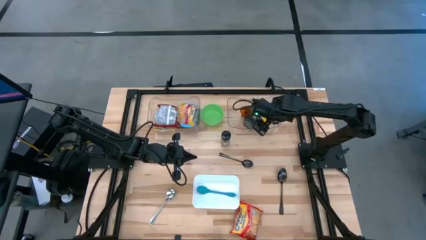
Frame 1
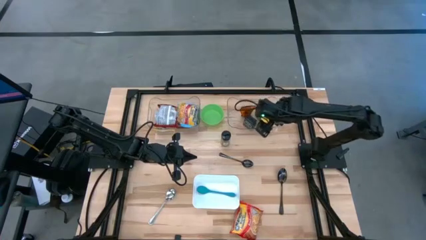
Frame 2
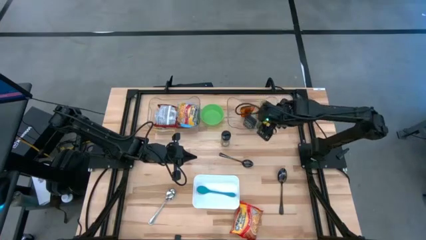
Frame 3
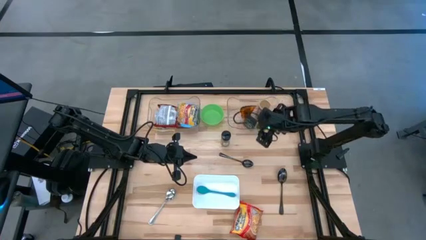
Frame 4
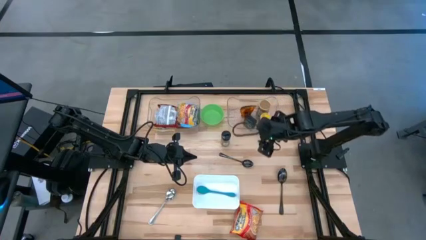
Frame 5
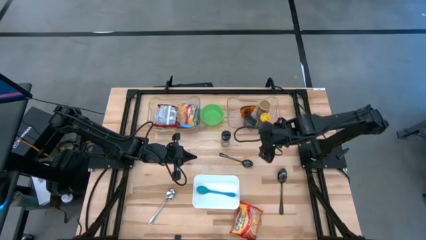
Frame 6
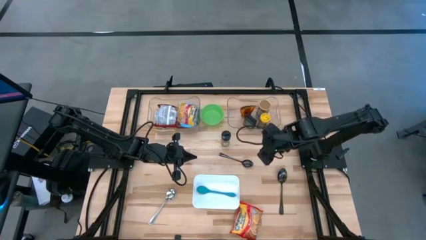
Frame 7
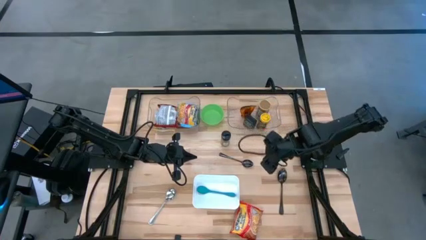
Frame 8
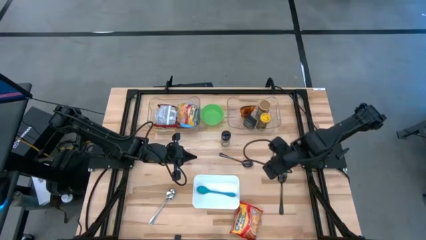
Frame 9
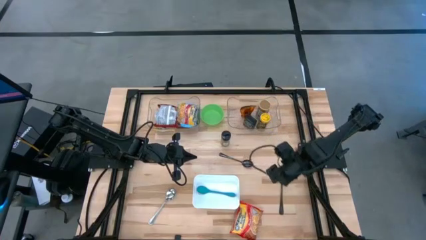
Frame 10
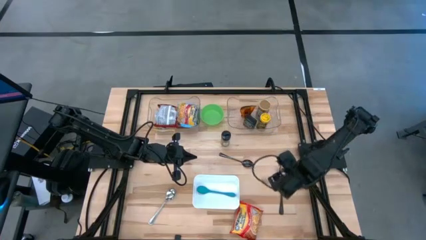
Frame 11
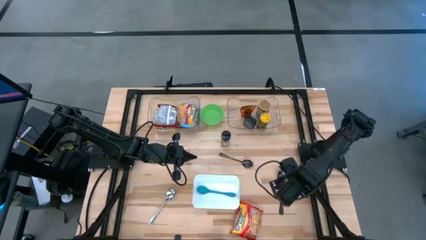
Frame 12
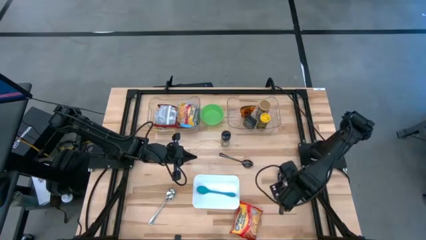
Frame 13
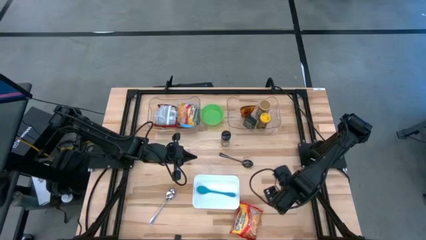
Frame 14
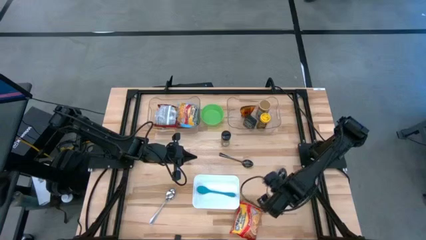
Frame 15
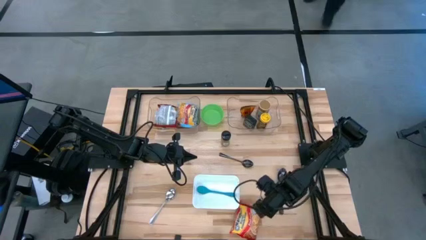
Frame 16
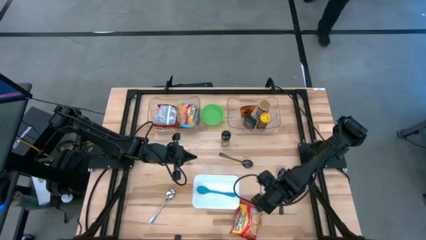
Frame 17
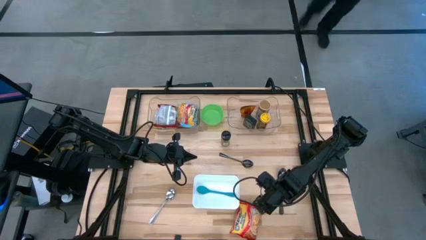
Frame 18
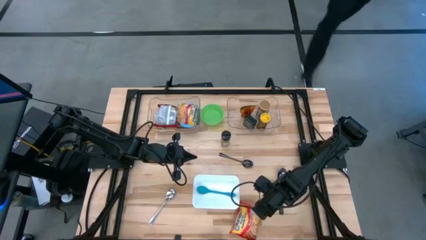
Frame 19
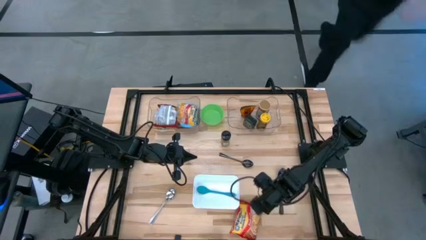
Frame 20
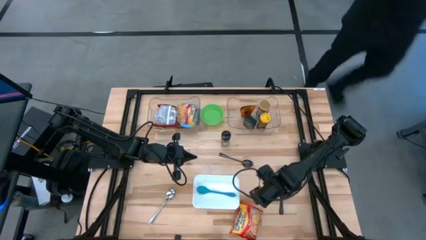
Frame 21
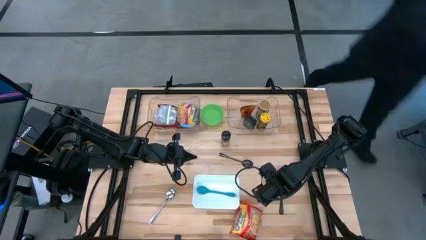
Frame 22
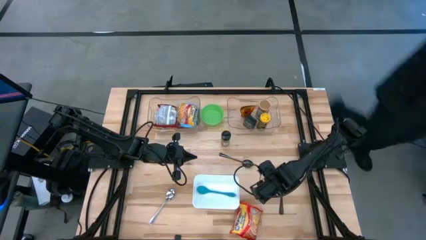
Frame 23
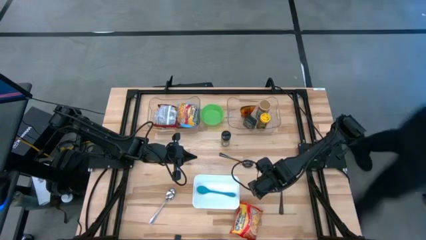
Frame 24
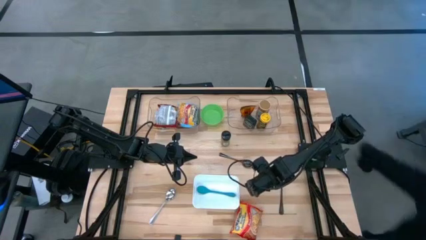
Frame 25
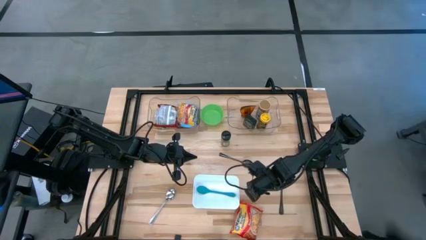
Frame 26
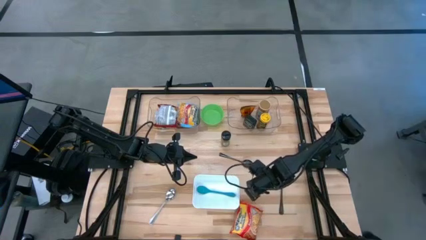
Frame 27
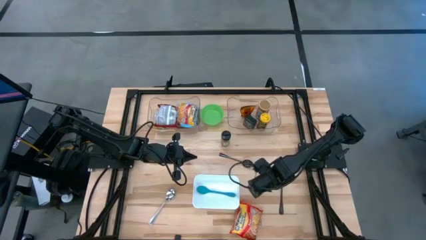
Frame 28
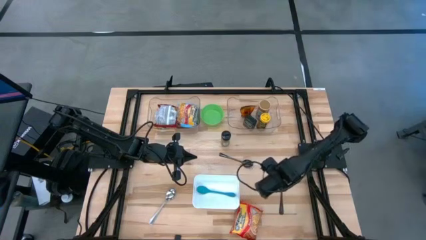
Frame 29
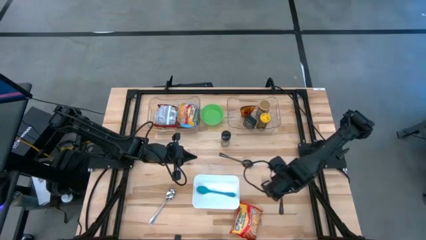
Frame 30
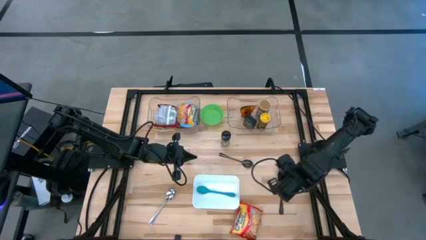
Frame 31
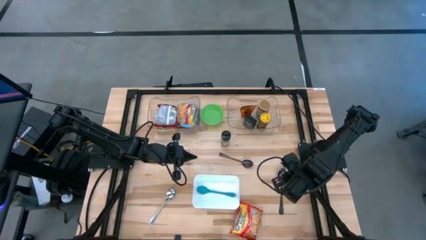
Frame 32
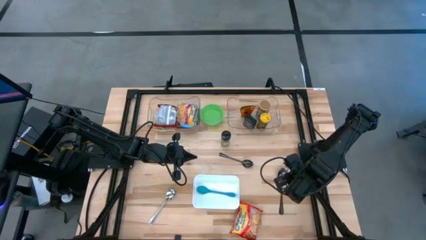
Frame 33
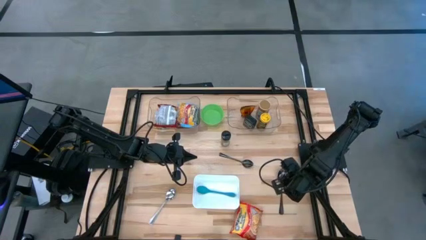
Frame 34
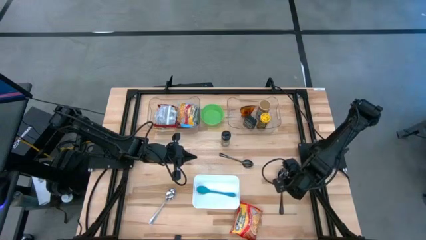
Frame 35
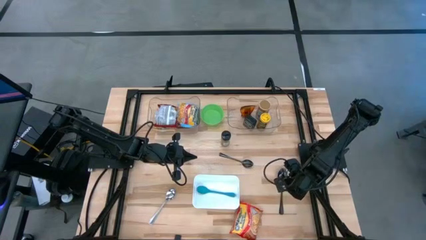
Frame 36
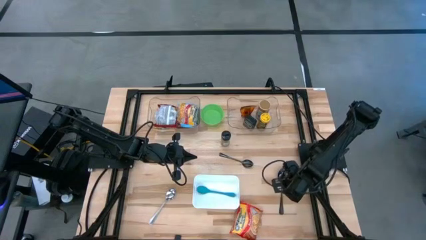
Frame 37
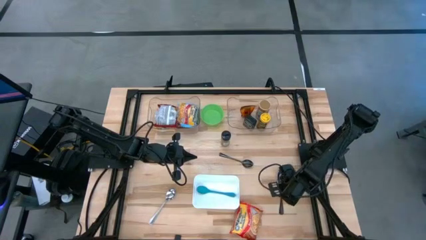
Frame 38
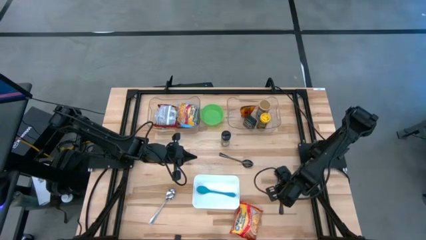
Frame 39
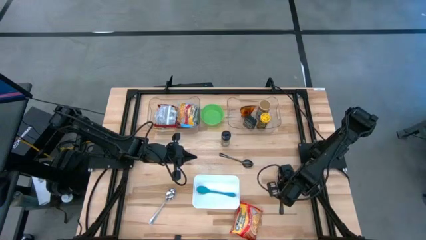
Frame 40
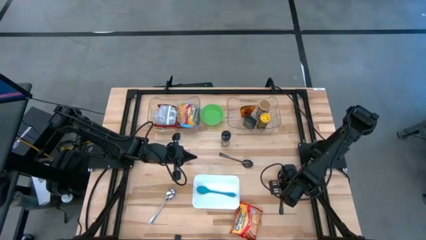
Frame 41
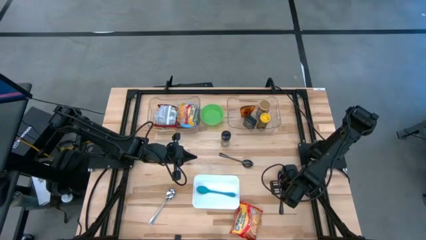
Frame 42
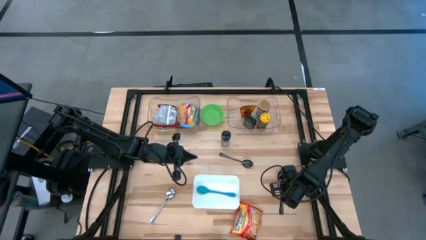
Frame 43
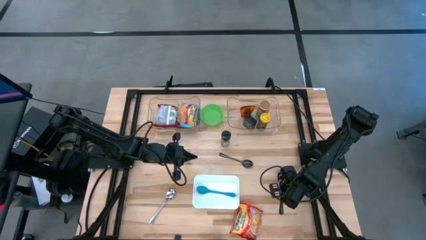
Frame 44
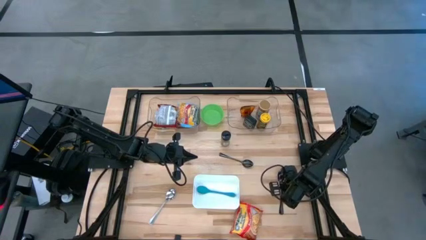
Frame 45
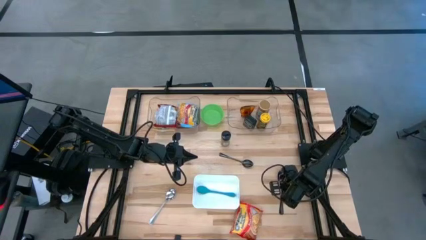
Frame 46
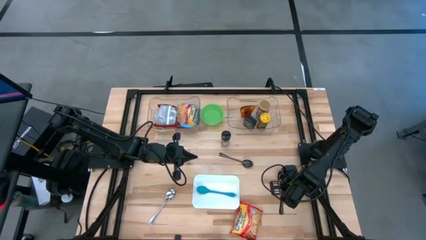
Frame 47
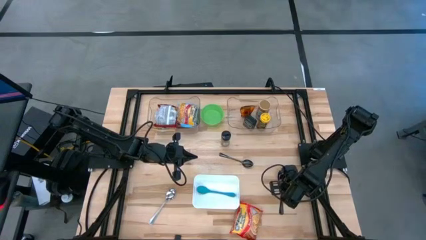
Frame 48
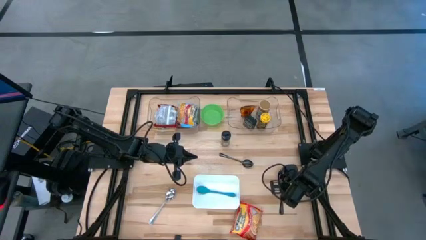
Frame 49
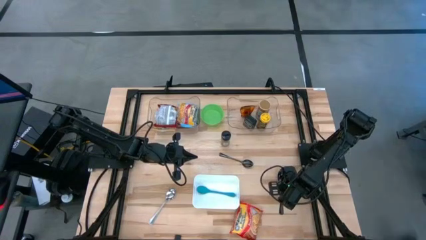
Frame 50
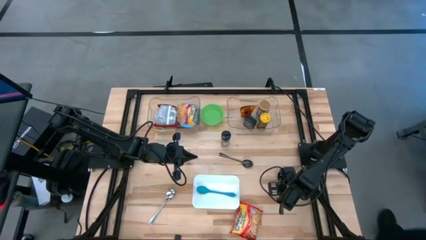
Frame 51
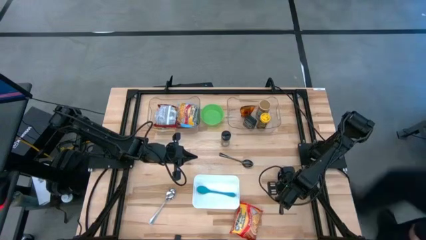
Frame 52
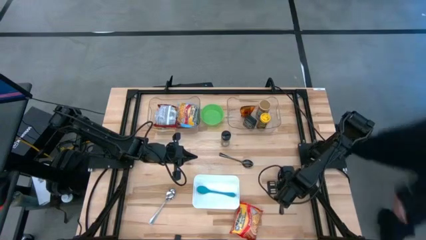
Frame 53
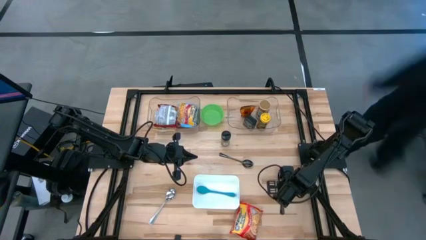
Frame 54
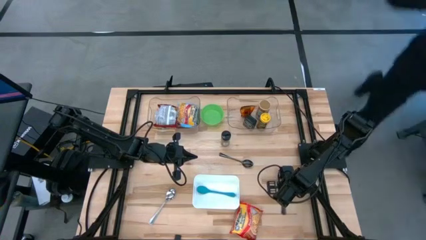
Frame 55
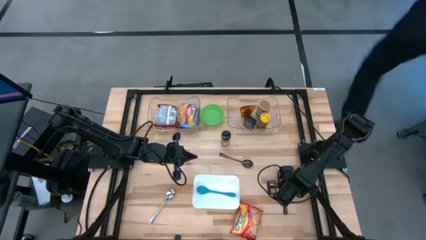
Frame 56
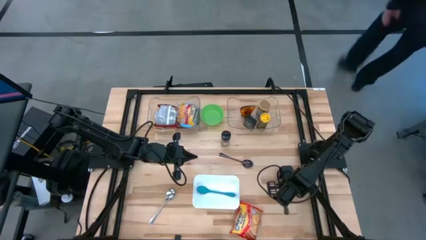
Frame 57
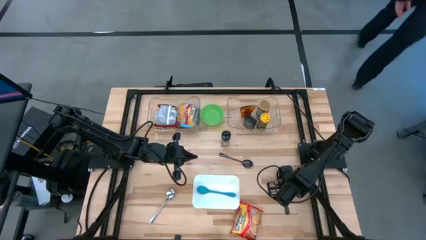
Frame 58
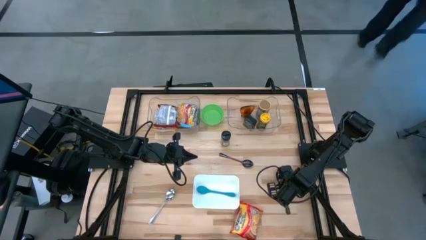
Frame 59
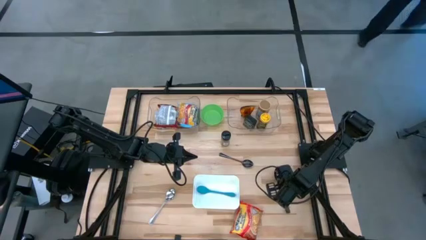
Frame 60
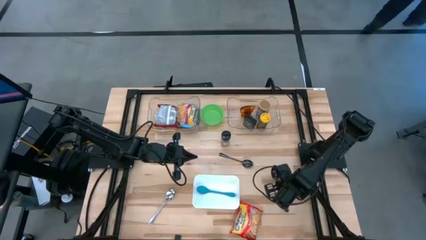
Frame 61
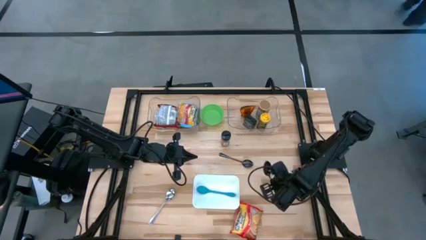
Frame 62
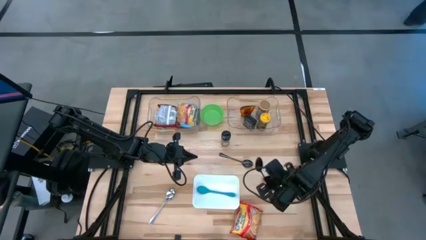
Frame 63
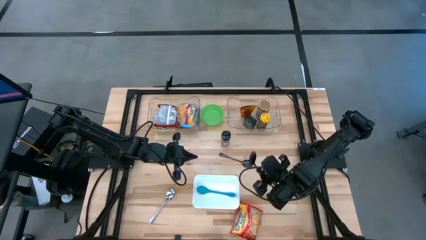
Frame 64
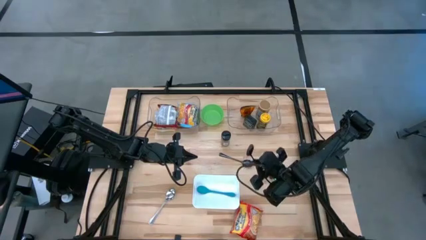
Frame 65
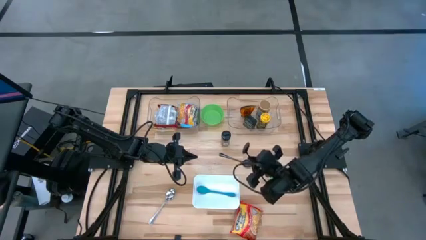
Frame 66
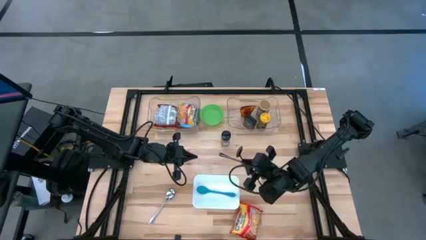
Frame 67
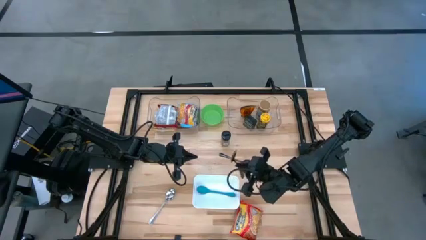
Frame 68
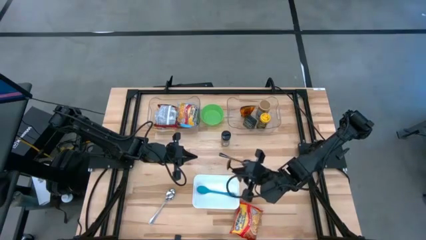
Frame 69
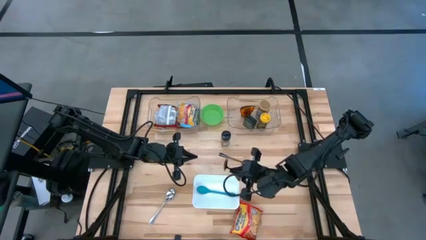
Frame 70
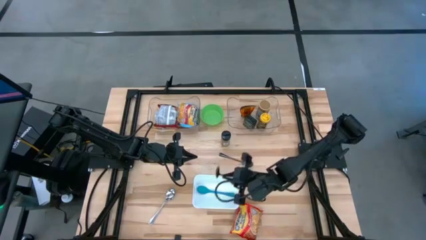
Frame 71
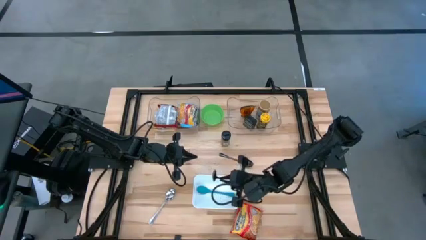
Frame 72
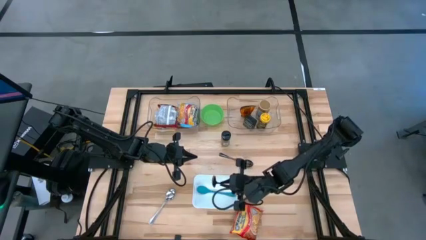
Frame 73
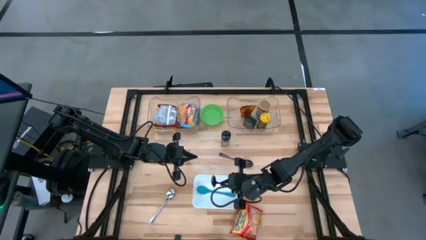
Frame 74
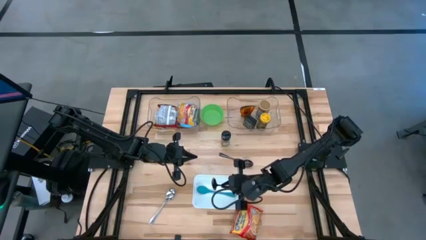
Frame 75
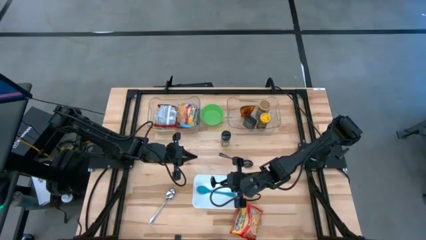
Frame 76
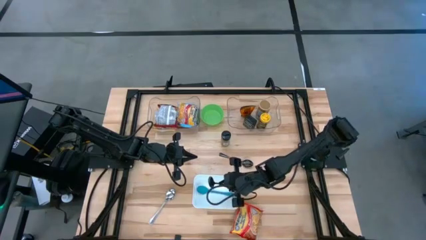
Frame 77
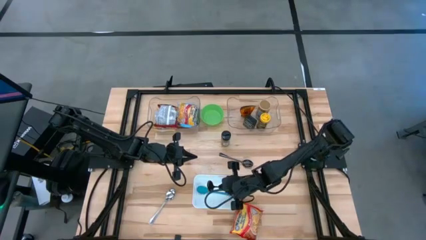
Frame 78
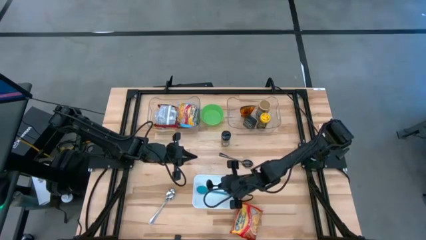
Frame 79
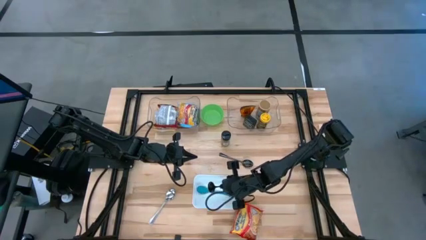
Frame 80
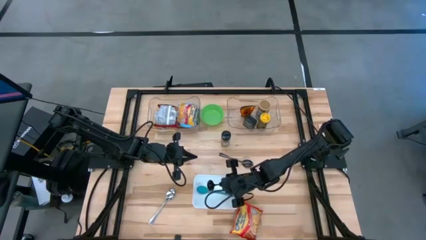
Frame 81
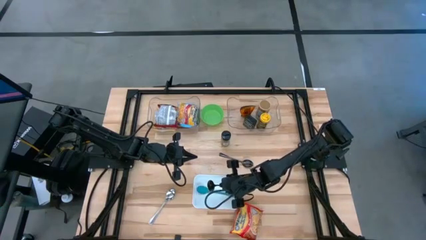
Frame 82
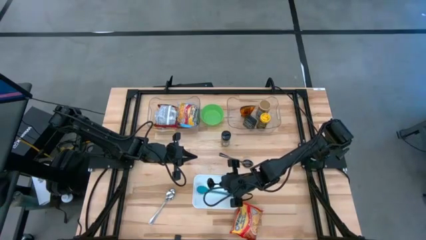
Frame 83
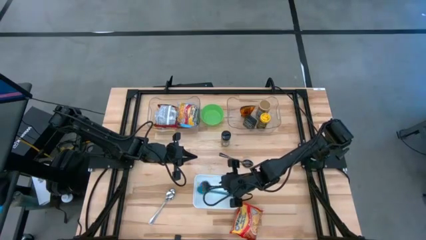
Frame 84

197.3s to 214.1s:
Task: Pick & Place Food Item
Put the right black spoon into the white bin
